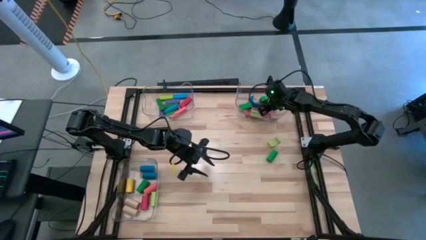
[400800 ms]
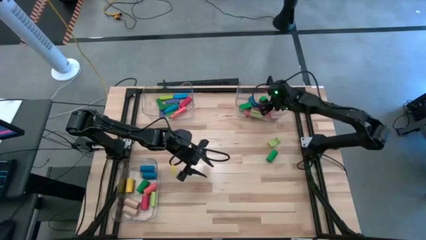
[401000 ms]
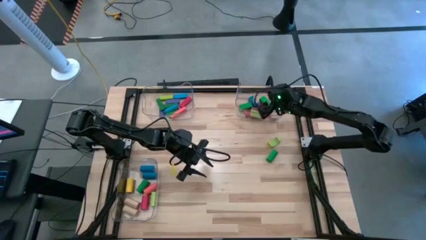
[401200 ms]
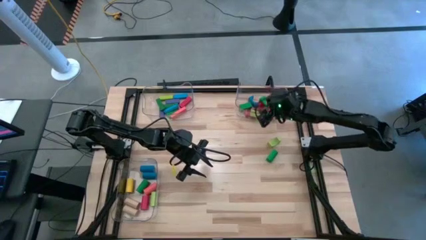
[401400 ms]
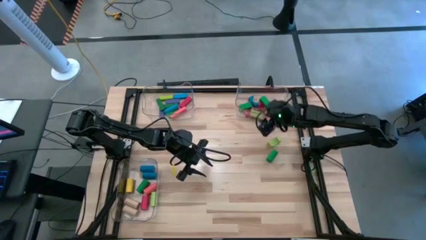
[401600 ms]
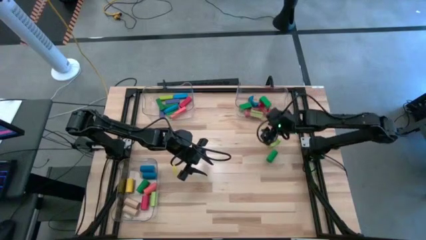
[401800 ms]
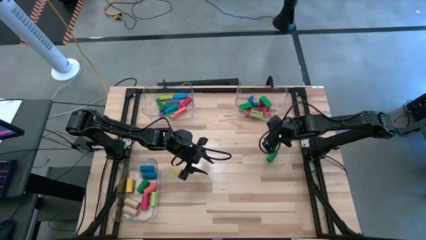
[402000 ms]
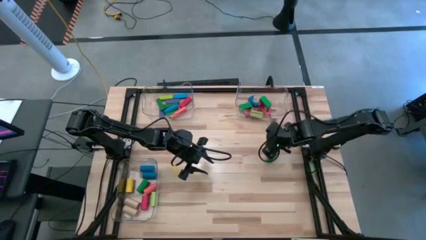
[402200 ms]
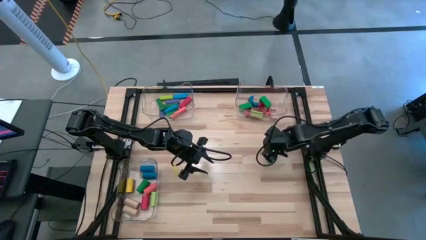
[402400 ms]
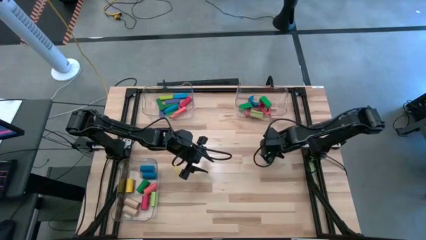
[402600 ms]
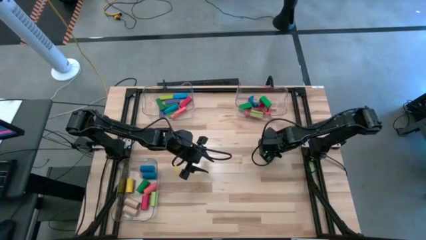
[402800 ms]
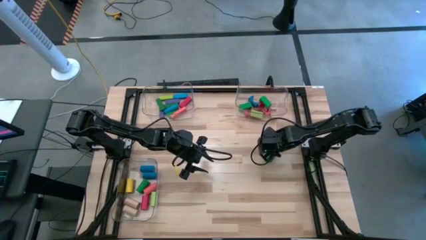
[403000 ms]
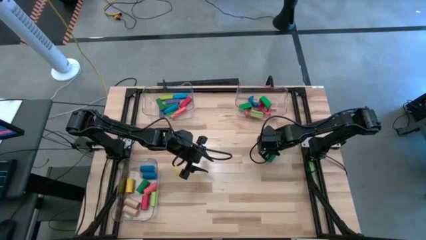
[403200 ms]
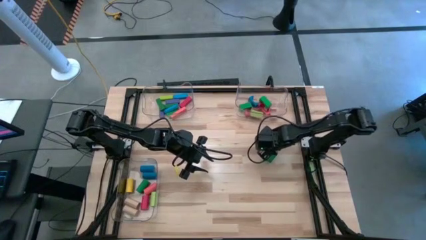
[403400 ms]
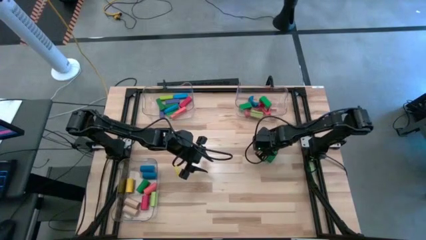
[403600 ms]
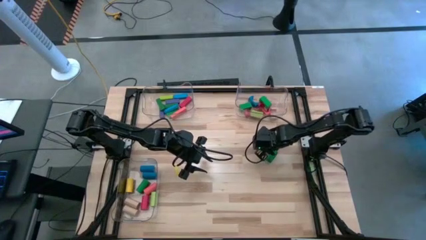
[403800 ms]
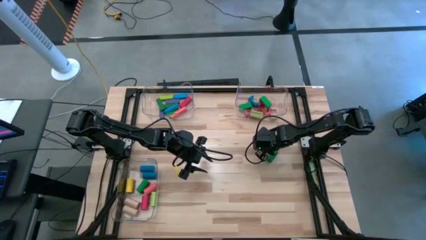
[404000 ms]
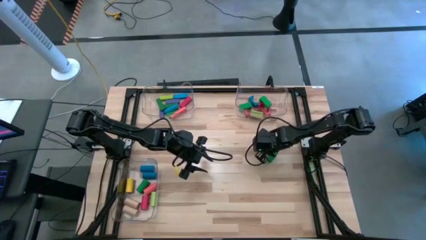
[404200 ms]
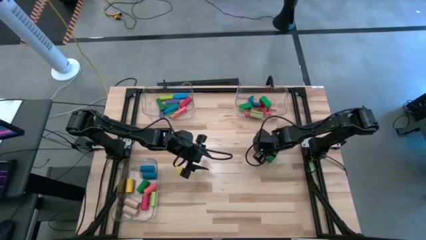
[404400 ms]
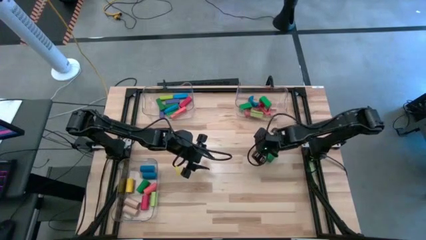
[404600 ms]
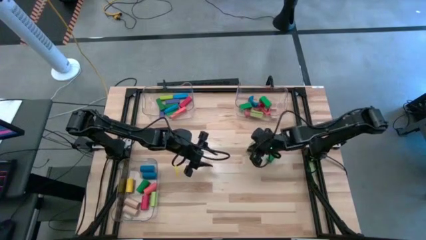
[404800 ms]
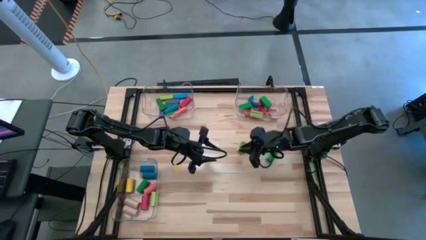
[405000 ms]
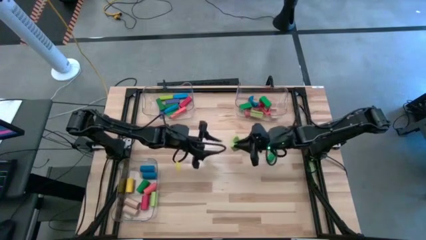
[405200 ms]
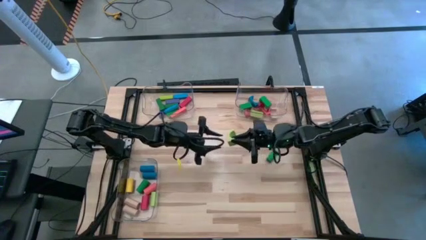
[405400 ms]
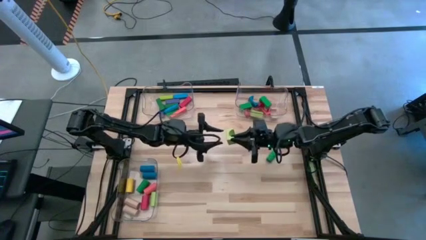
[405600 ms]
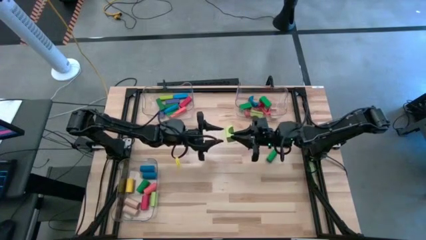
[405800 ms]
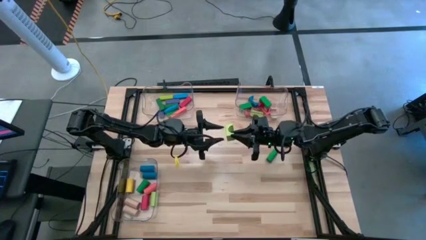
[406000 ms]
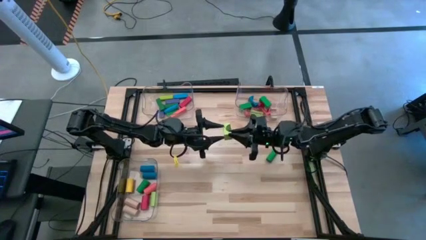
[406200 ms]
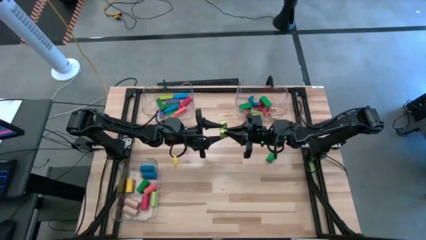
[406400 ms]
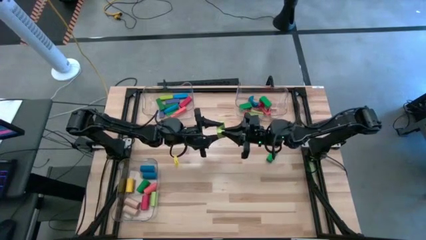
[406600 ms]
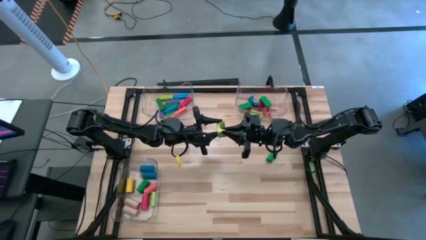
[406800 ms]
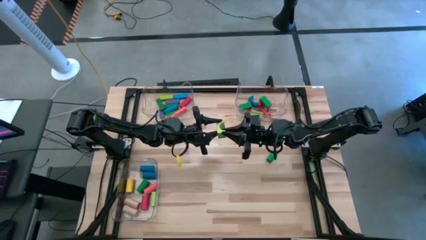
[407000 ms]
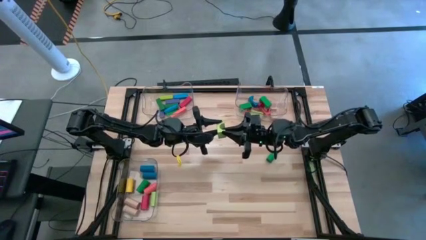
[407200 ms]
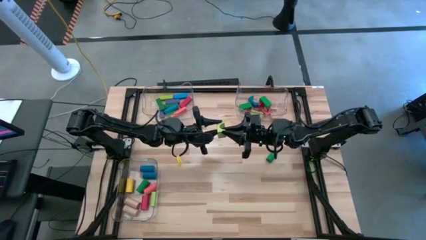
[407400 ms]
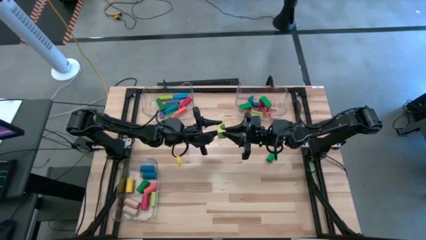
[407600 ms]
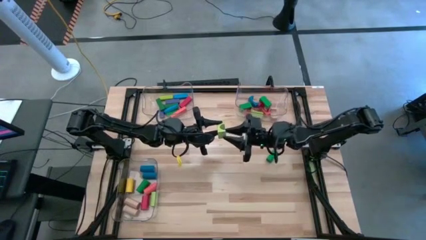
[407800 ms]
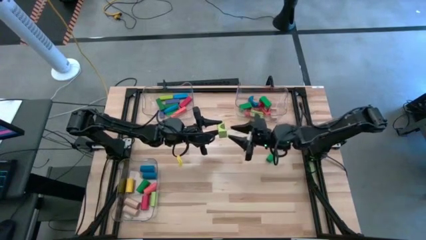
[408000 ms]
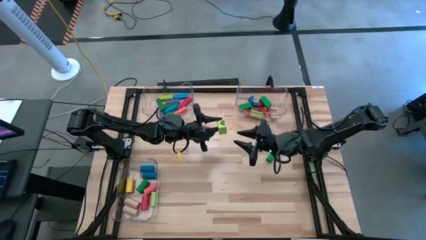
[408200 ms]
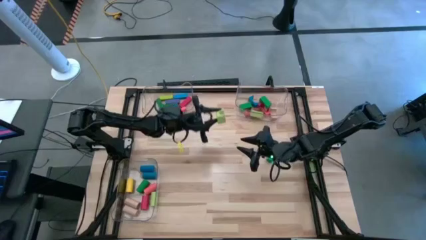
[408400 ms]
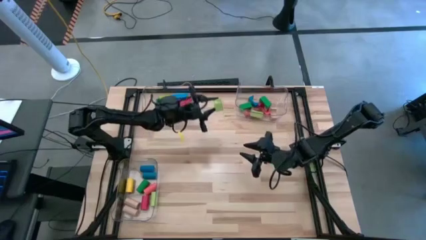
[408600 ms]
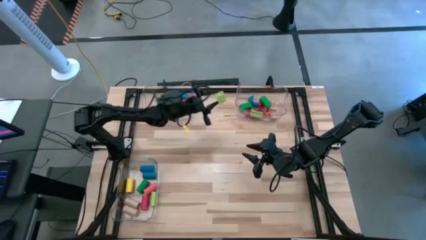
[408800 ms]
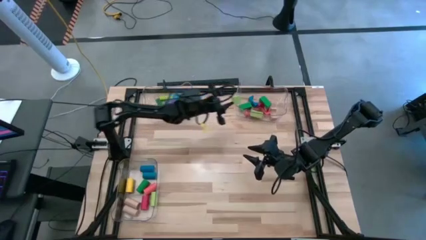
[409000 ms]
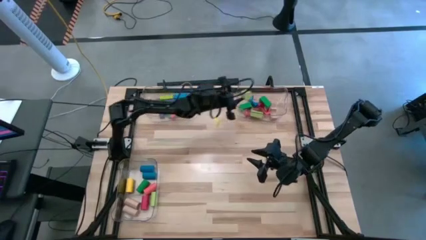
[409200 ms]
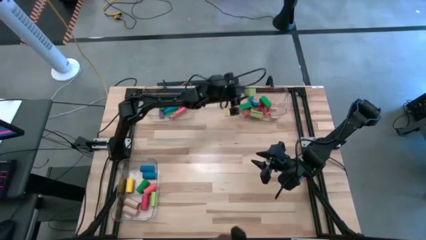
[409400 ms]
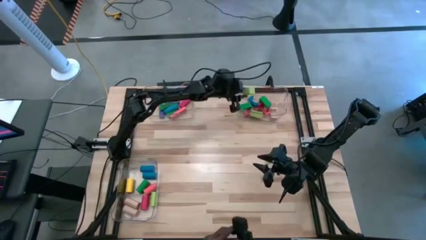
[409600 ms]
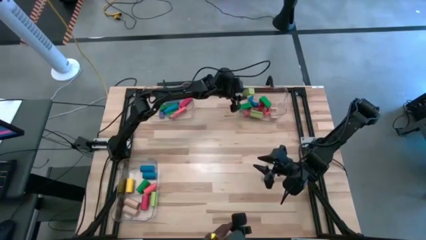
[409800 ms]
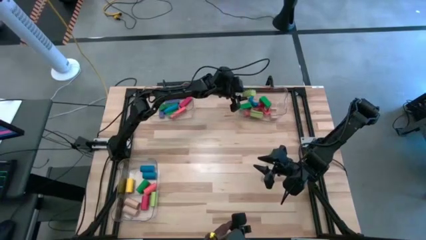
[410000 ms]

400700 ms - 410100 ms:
Task: Sort blocks by size
Put the light green arch block into the top right transparent bin

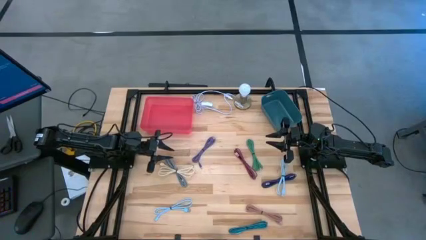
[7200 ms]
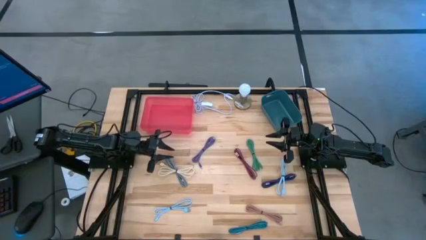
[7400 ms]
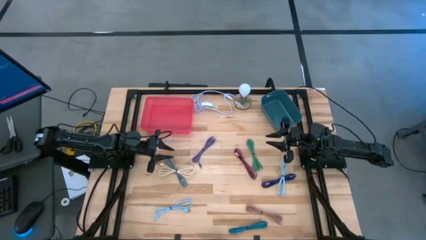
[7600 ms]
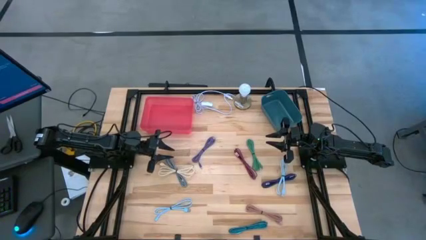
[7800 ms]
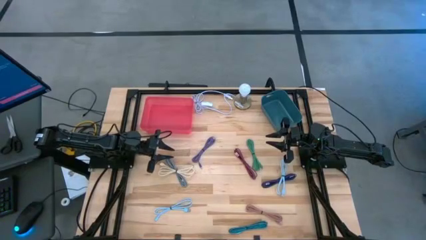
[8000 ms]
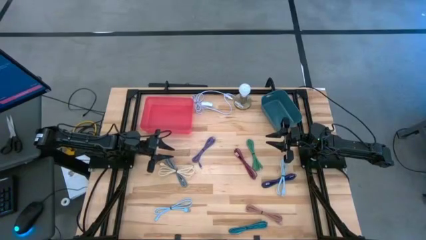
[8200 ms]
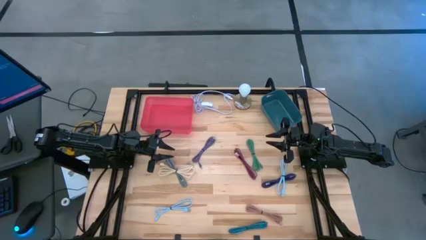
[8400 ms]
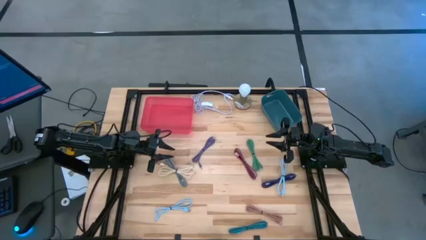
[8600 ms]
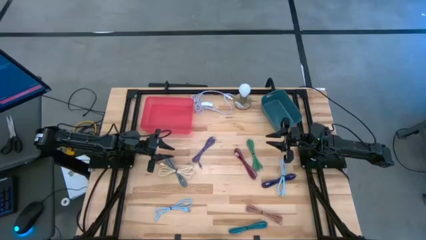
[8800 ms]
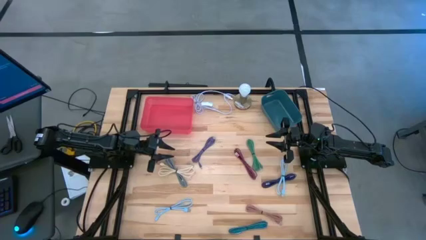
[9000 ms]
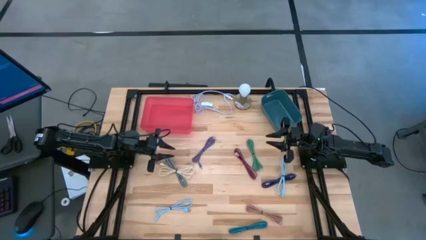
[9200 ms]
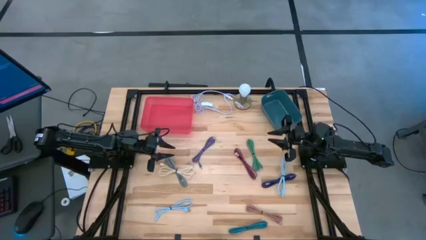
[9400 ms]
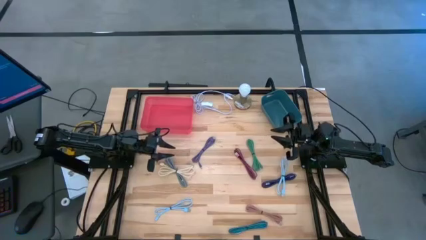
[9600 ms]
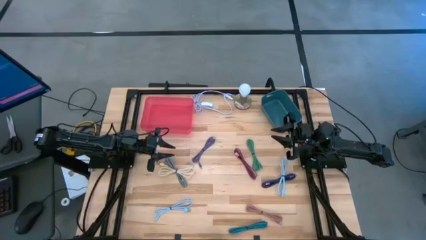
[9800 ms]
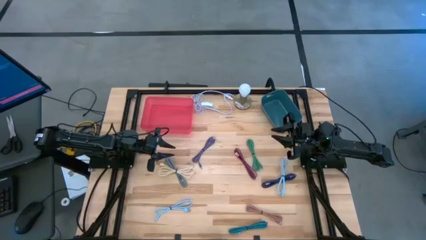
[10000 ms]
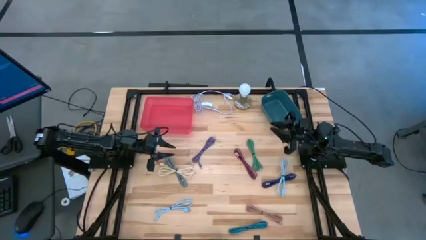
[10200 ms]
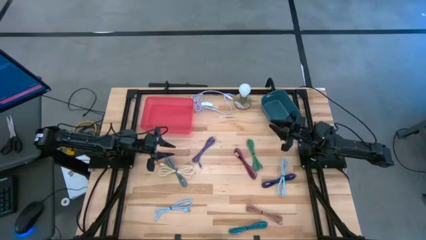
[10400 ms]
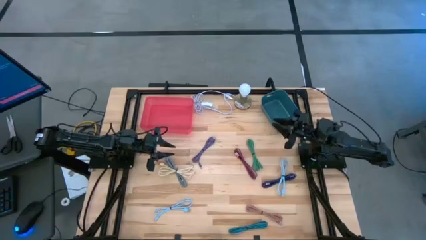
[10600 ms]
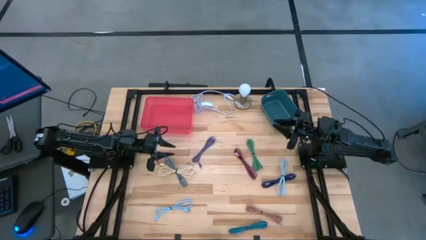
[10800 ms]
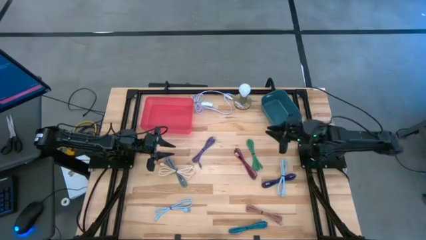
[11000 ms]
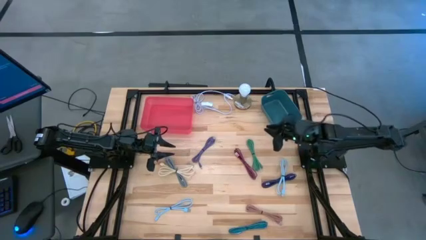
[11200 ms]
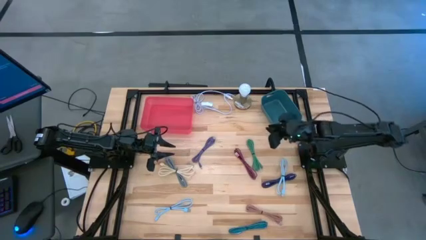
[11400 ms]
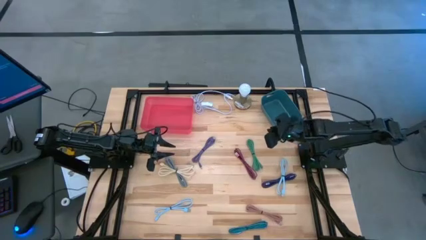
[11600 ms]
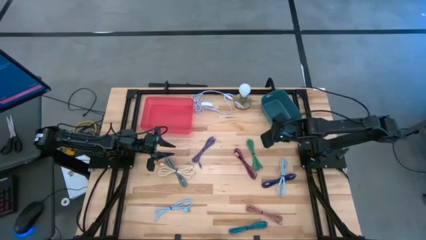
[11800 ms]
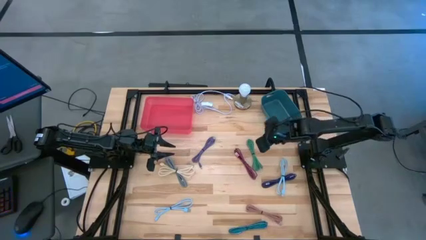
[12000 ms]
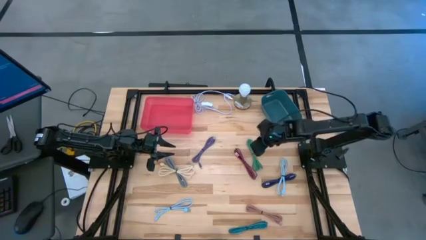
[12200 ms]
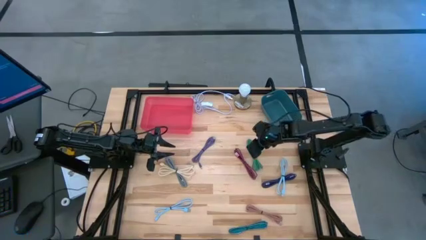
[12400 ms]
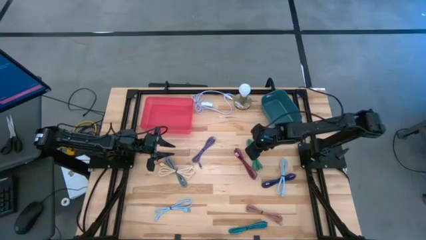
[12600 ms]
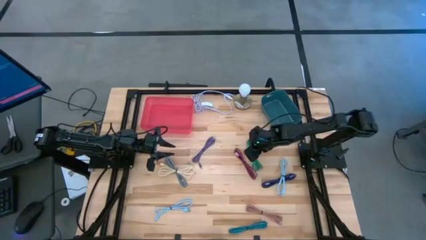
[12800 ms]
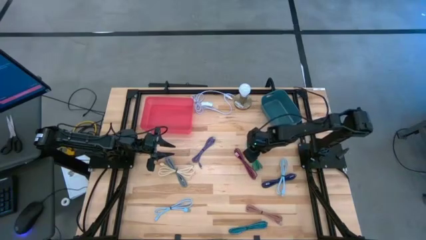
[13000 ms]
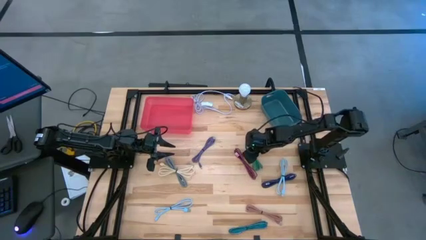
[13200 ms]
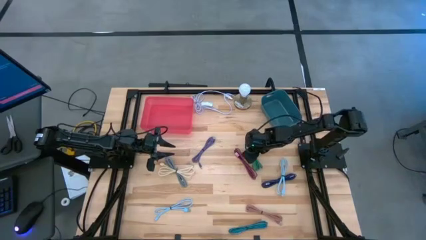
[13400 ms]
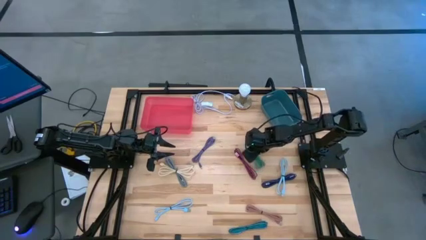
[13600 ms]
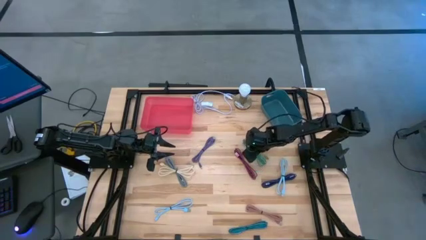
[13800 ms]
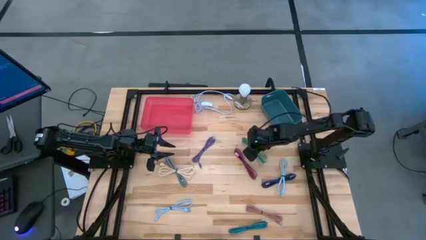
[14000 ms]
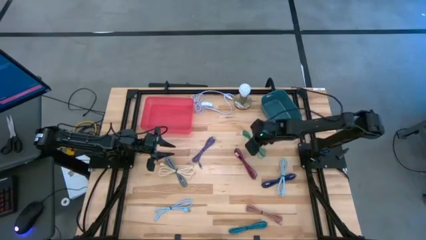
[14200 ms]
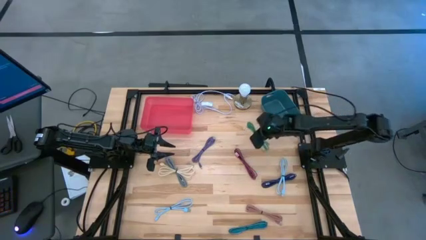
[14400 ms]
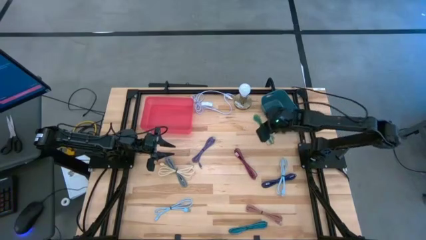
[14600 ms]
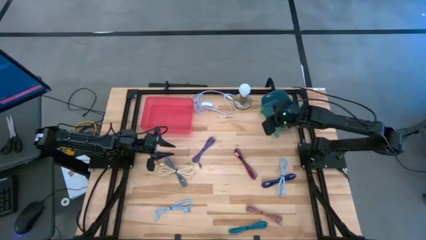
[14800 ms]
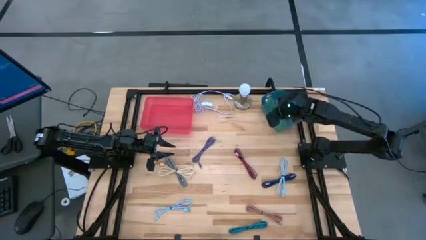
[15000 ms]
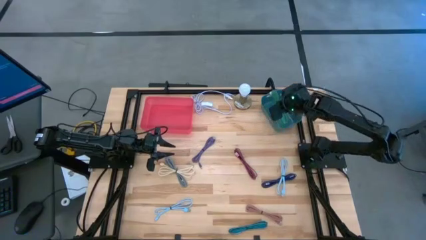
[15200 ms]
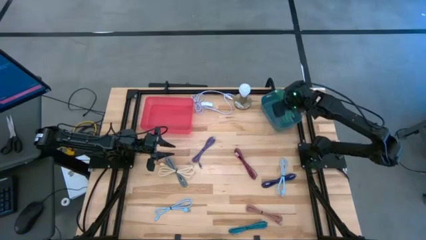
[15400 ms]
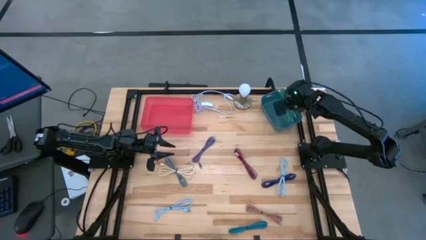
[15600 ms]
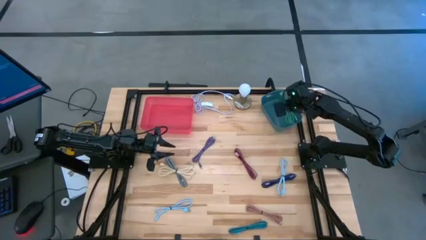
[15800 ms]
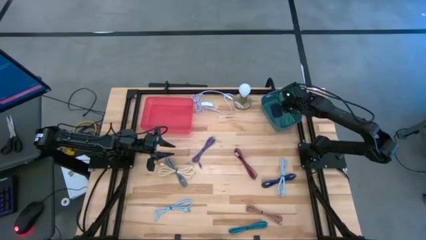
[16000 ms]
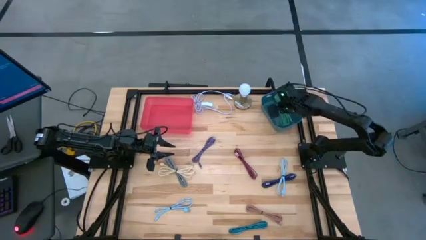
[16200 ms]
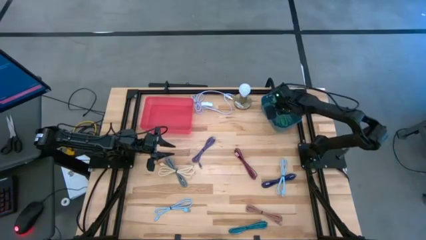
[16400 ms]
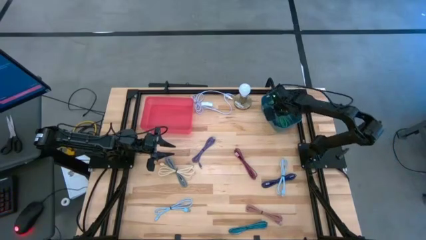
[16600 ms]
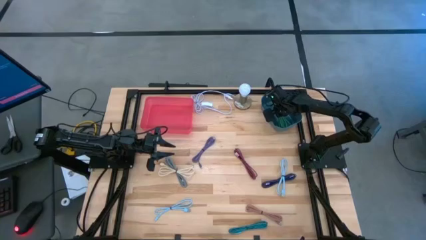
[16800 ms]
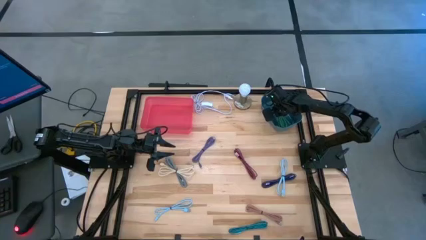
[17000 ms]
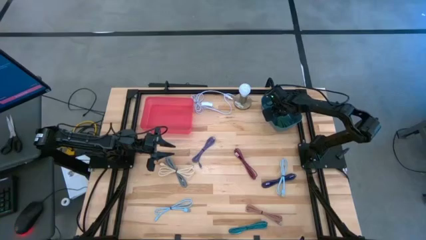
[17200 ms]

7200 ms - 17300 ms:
Task: Pick & Place USB Port
Put the green charger cable into the blue bin
